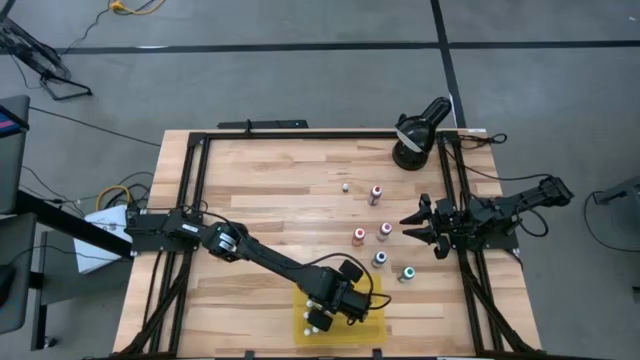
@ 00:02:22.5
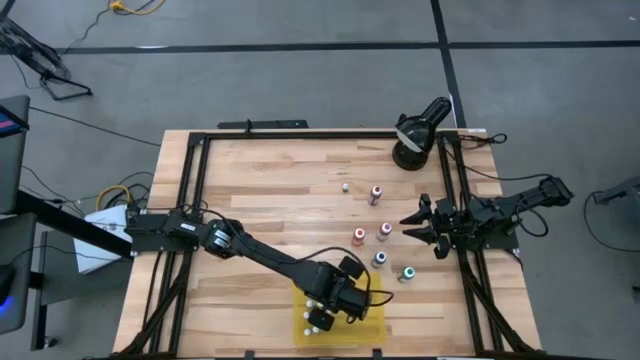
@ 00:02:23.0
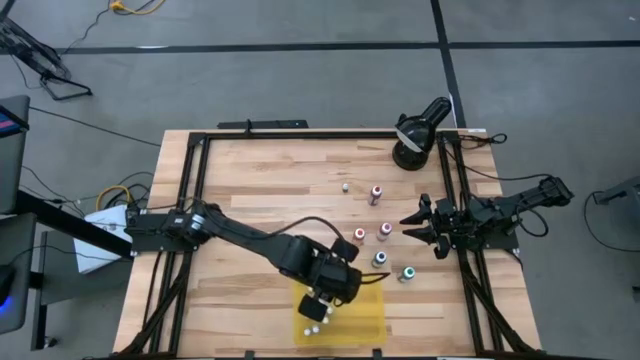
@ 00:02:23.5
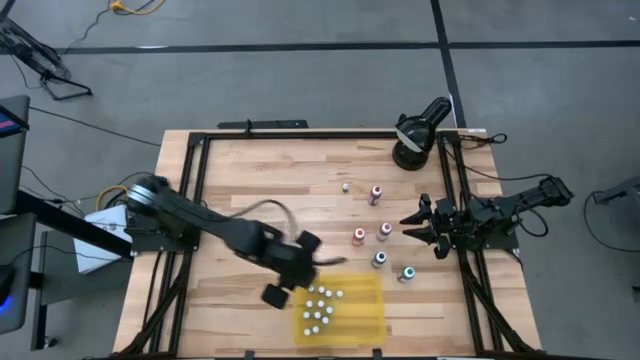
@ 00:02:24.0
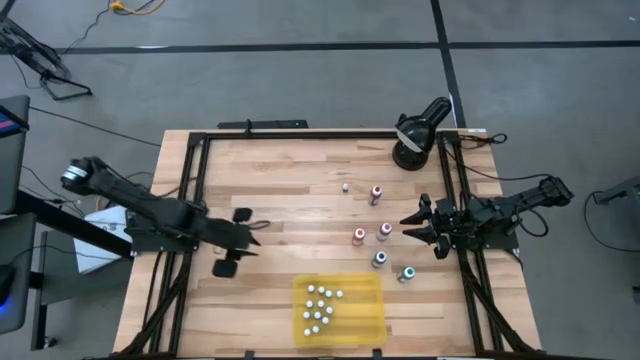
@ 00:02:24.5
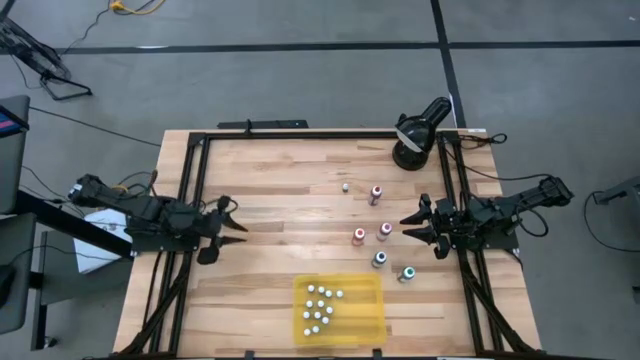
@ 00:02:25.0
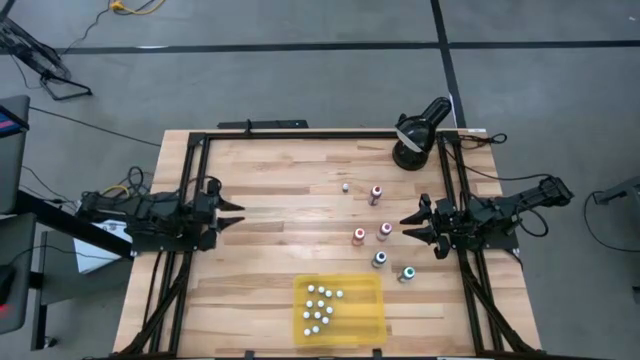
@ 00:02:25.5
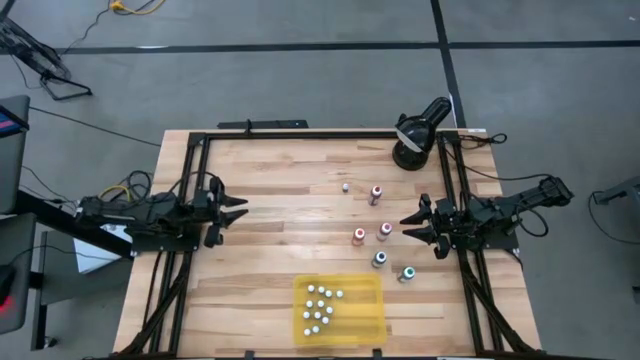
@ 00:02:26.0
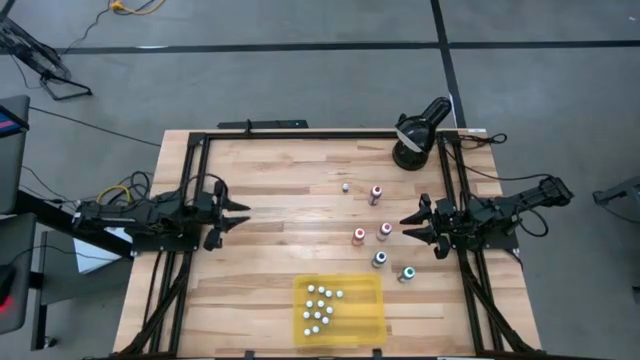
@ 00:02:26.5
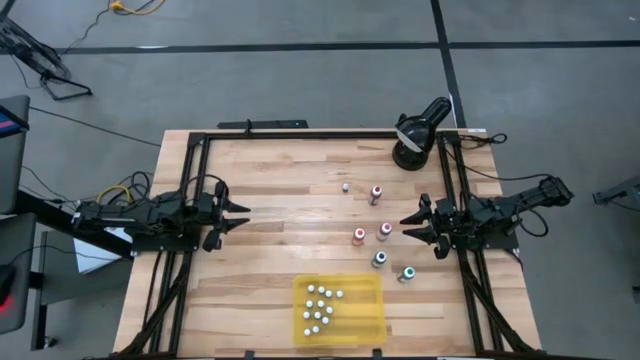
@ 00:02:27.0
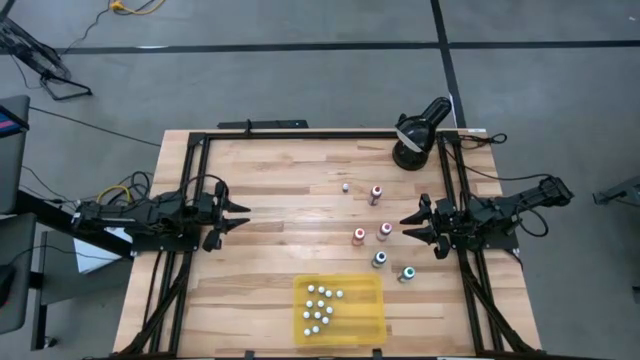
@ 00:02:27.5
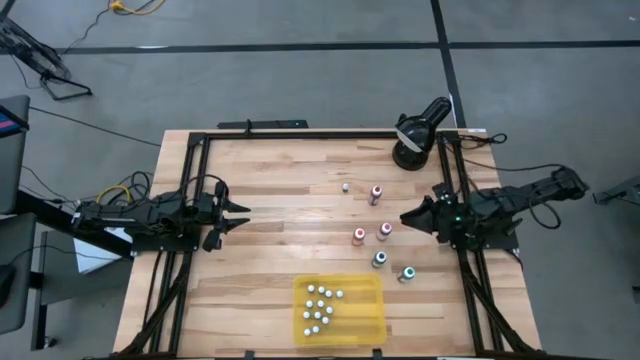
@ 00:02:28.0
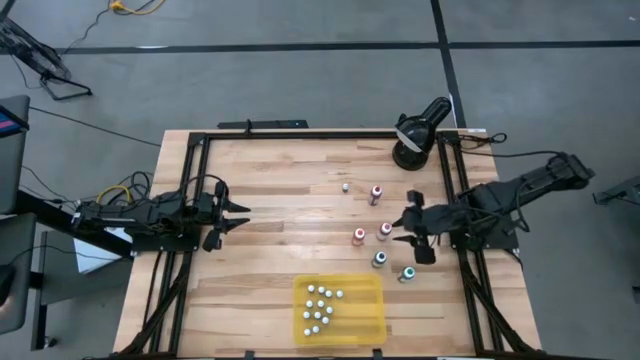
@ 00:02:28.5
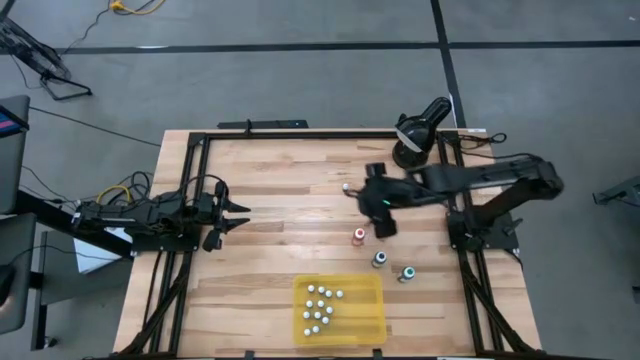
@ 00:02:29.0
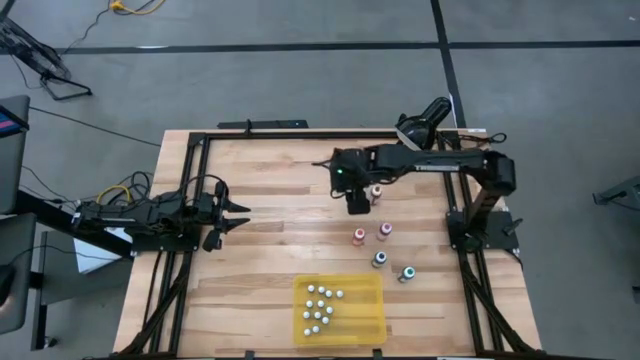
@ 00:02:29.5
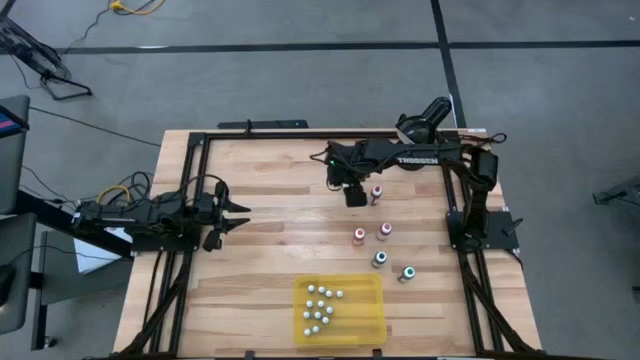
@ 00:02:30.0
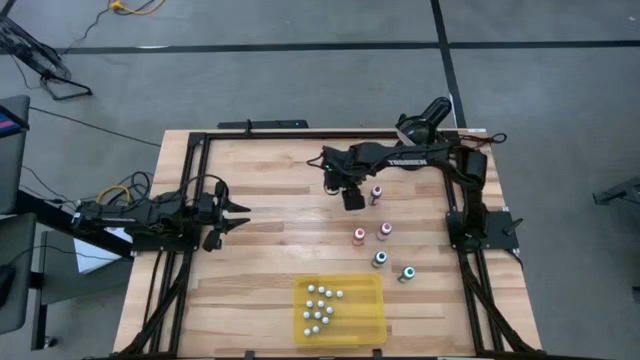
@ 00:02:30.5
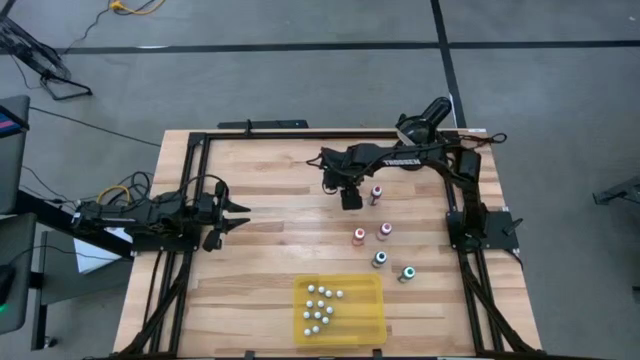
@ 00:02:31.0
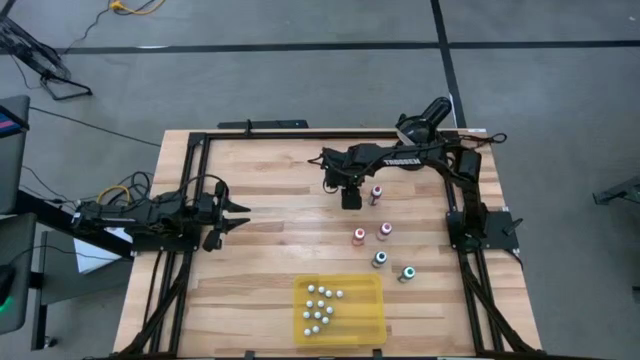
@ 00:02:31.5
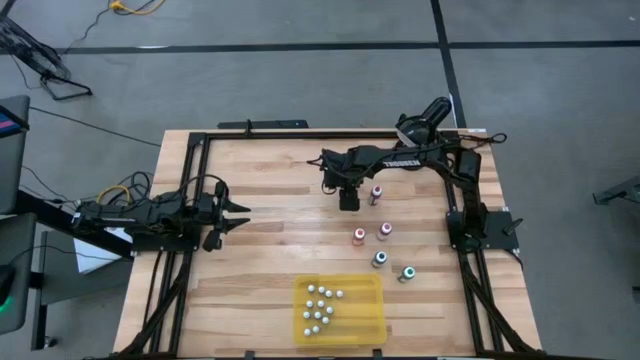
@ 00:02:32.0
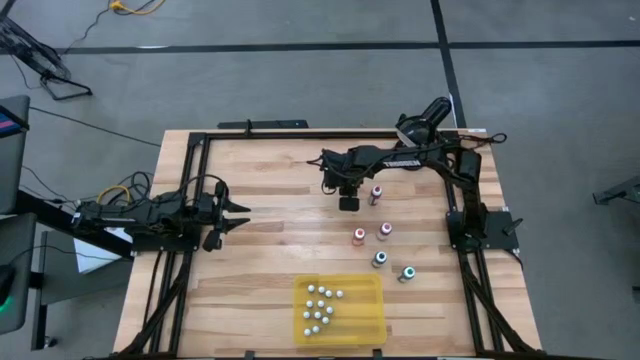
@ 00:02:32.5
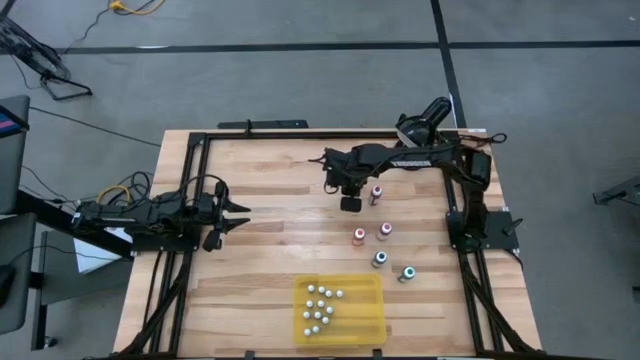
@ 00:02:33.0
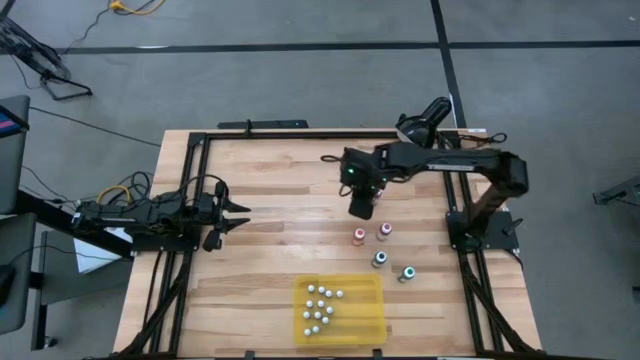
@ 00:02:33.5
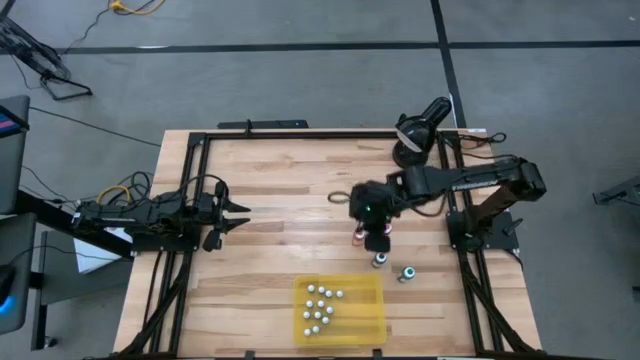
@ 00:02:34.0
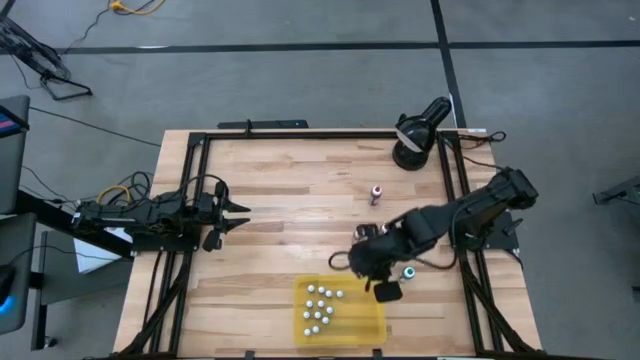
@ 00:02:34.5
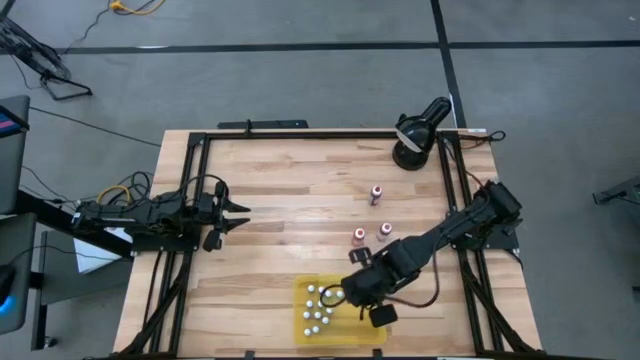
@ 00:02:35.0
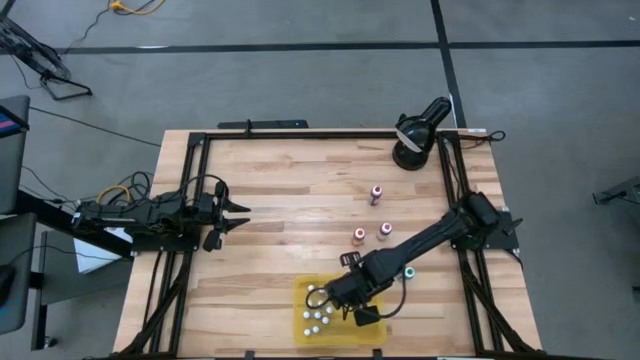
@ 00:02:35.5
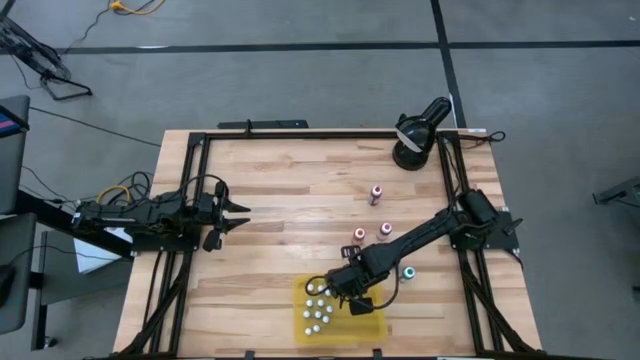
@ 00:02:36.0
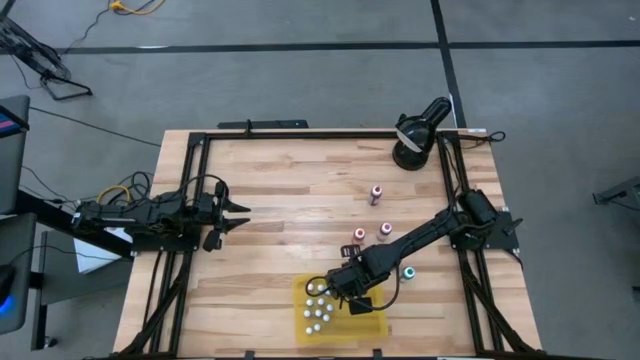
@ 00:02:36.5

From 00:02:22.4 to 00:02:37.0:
Task: Pick & Place food coloring
Put the small brown food coloring bottle in the yellow bin

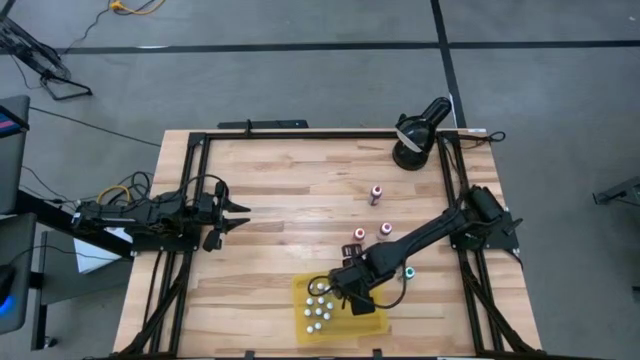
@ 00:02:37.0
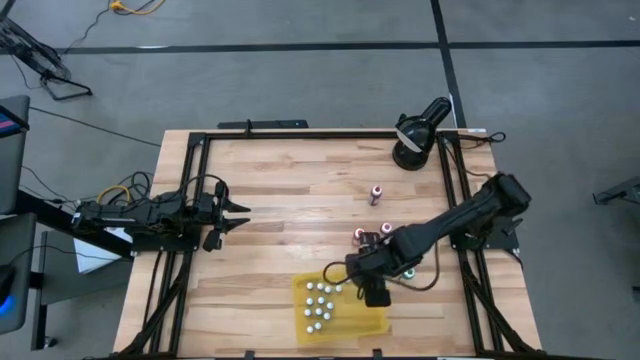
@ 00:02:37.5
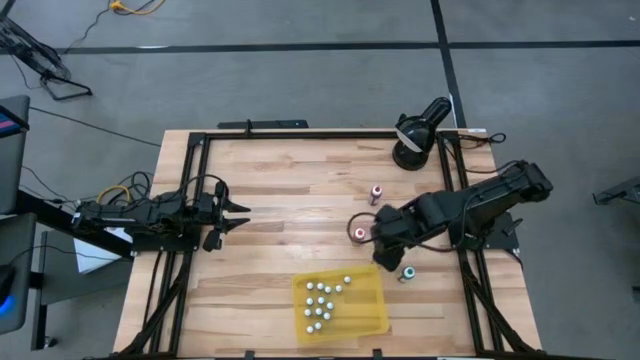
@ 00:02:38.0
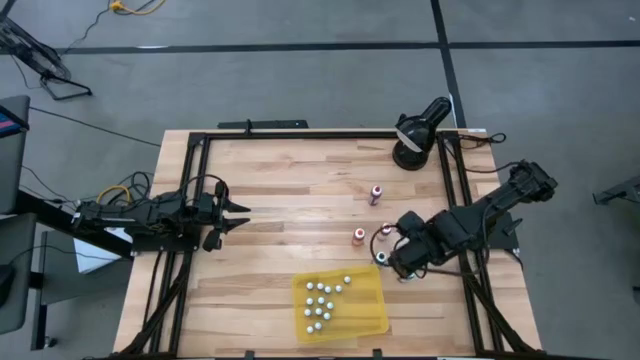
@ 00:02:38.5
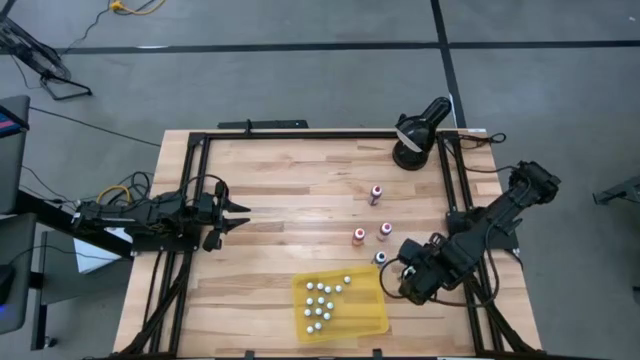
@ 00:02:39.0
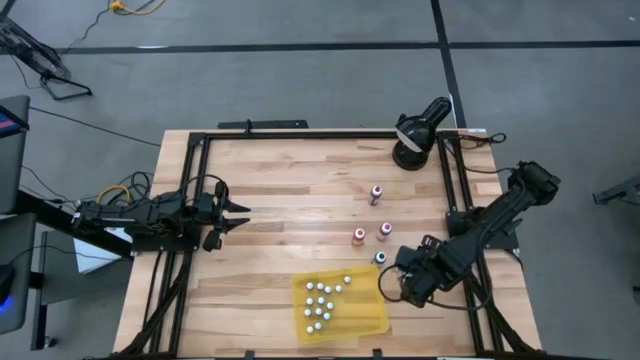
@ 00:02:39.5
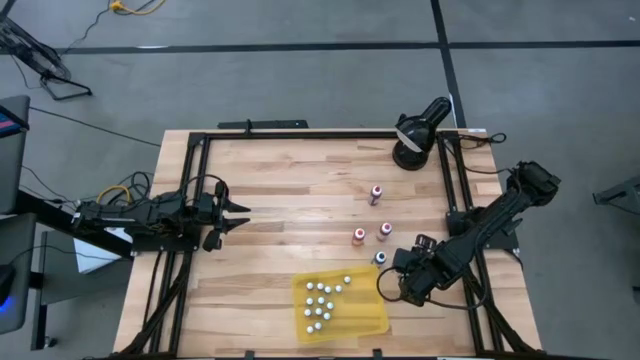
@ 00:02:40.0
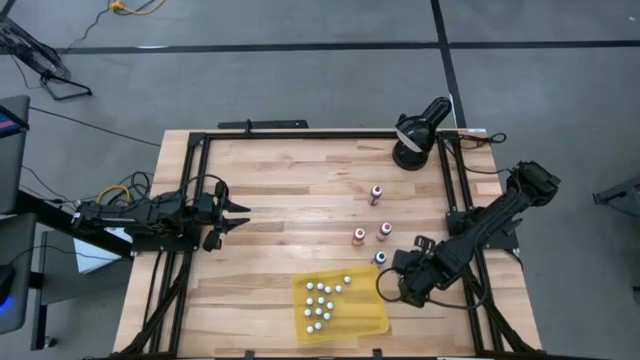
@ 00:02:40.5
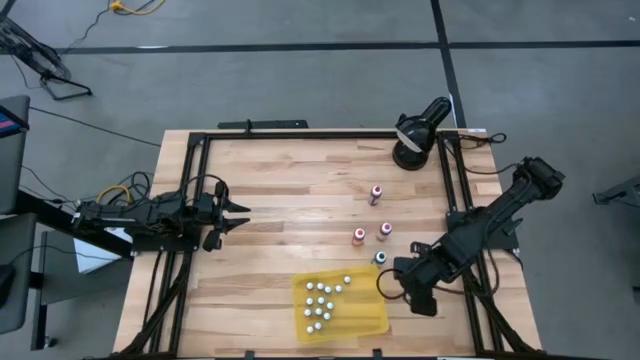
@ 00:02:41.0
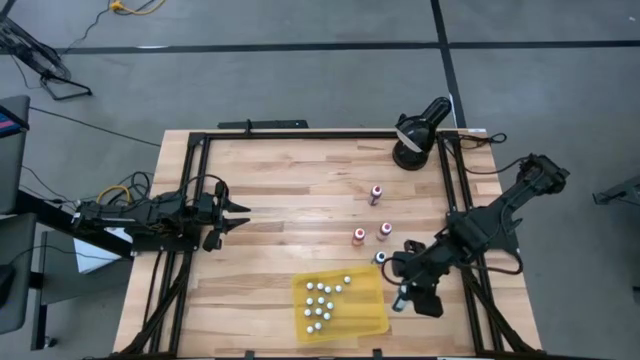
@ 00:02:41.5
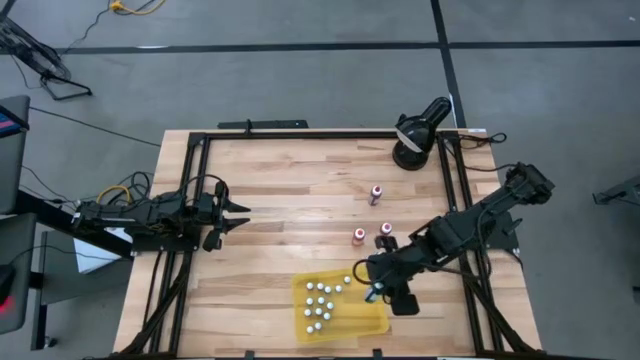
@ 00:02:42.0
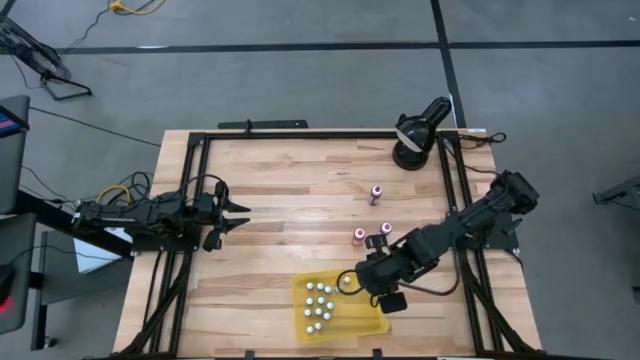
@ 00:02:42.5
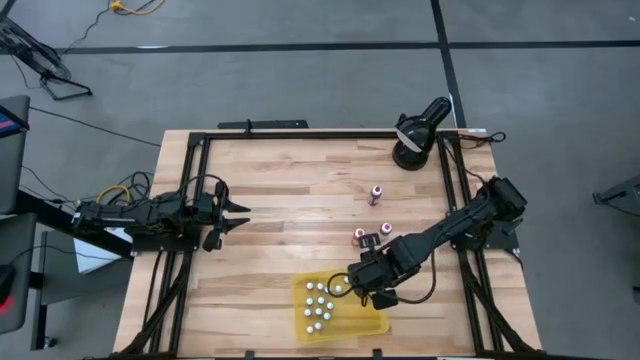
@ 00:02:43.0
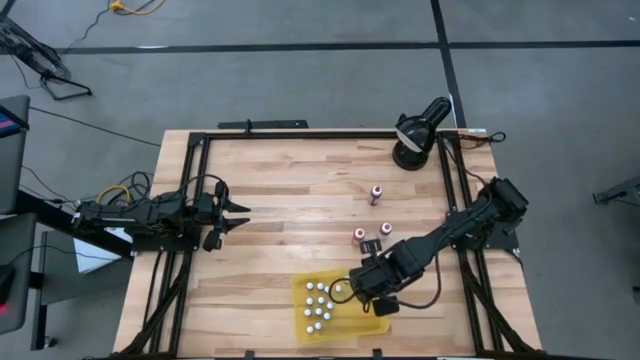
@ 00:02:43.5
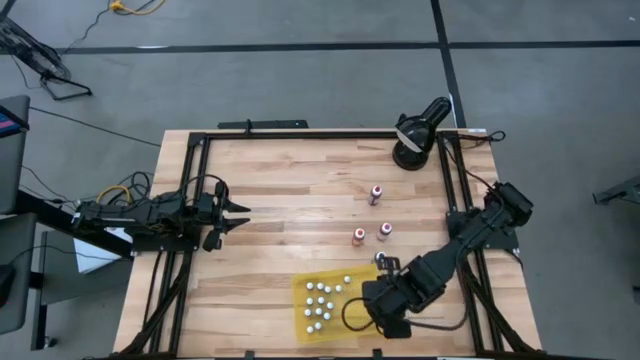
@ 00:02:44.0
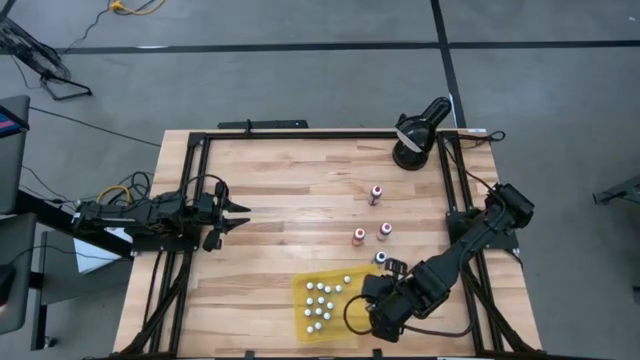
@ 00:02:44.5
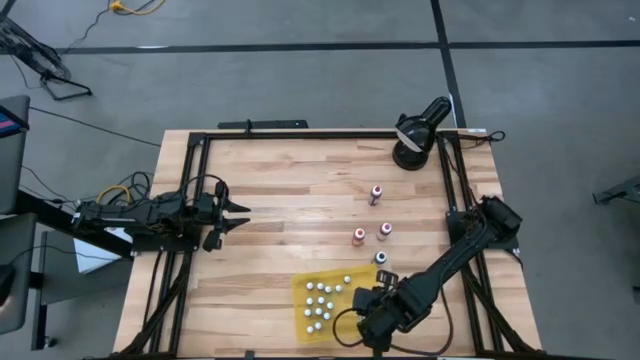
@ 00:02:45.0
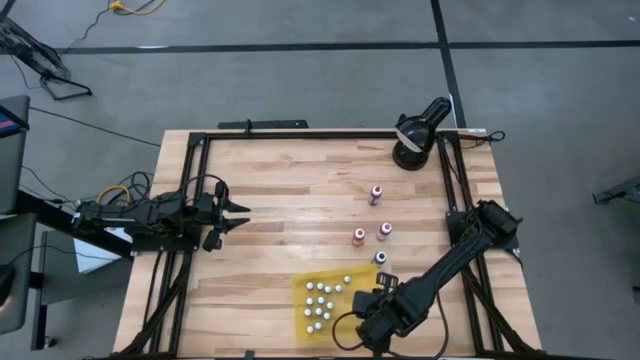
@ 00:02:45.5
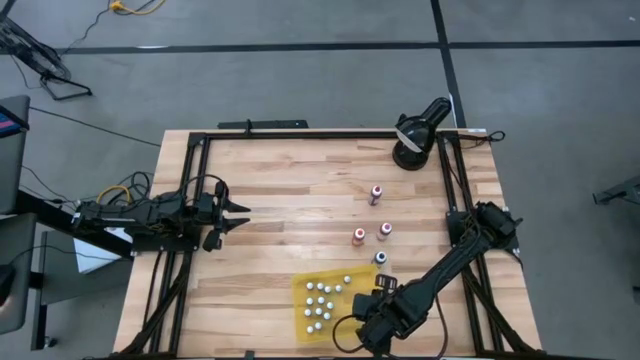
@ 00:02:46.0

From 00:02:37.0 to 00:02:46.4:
Put the big green food coloring bottle in the yellow bin
